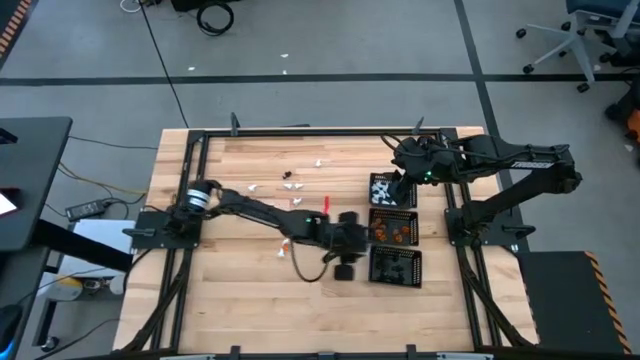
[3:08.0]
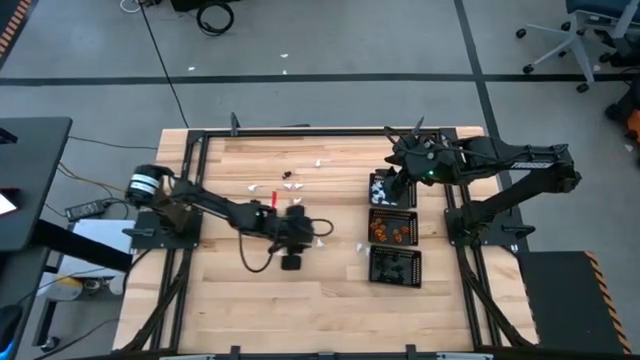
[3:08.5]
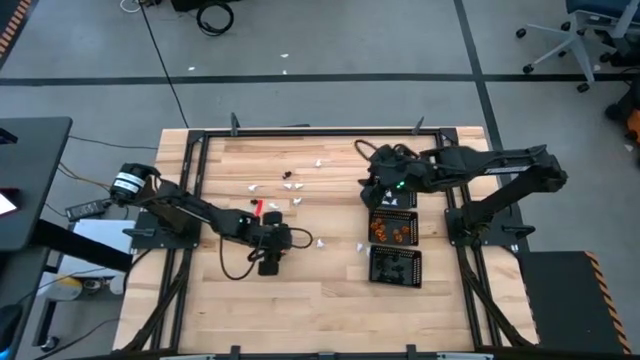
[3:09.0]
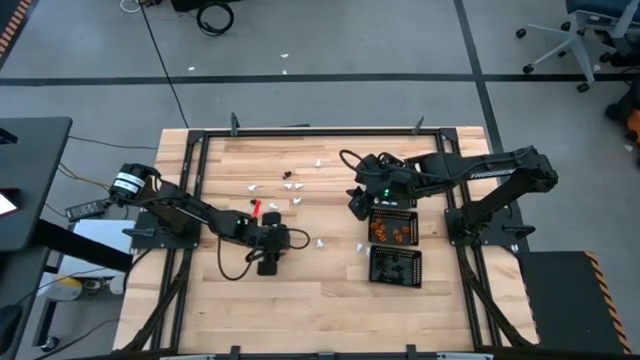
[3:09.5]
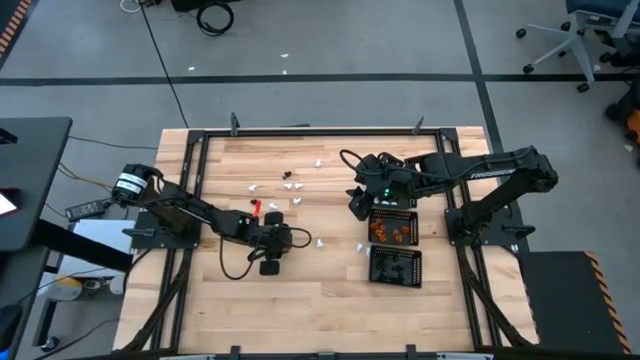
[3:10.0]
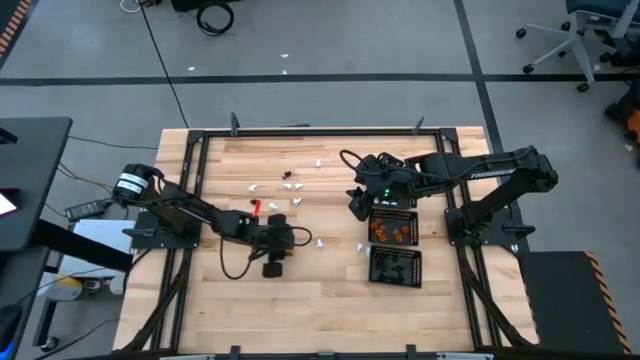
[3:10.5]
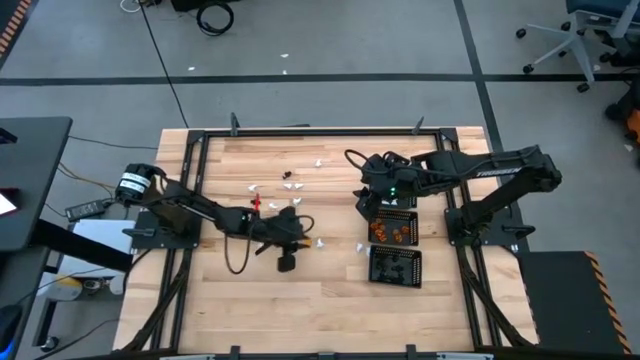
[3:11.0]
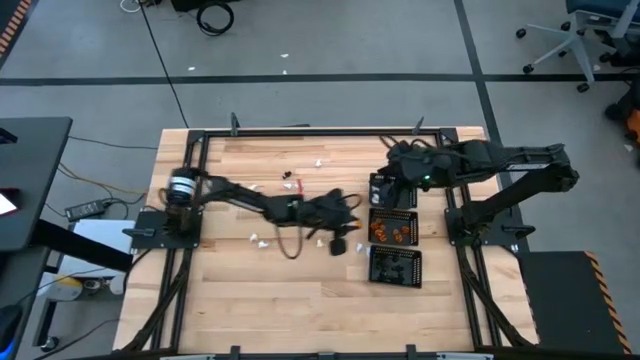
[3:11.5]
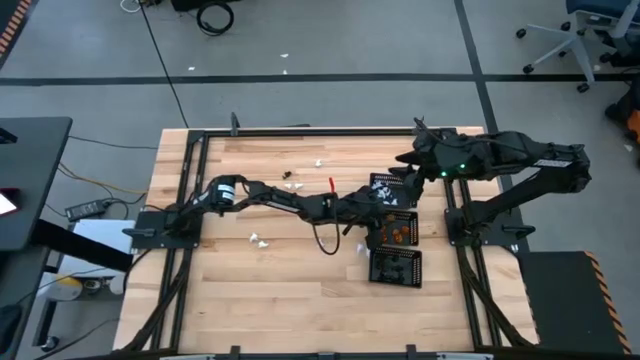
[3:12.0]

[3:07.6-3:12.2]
Task: Sort Halloween decoration
Put the orange pumpkin toy into the center black bin

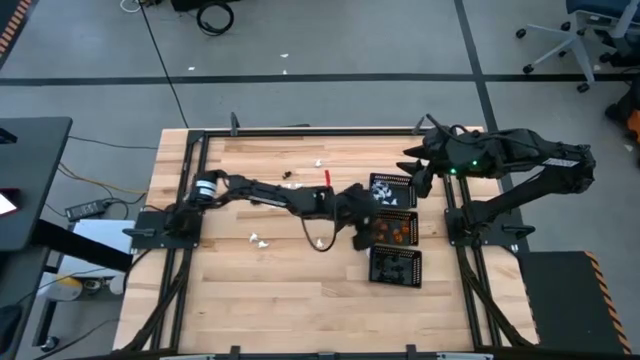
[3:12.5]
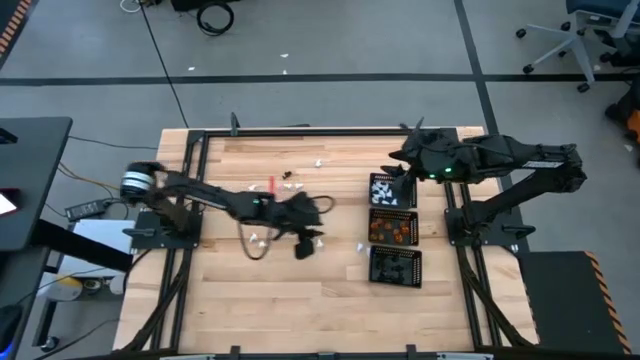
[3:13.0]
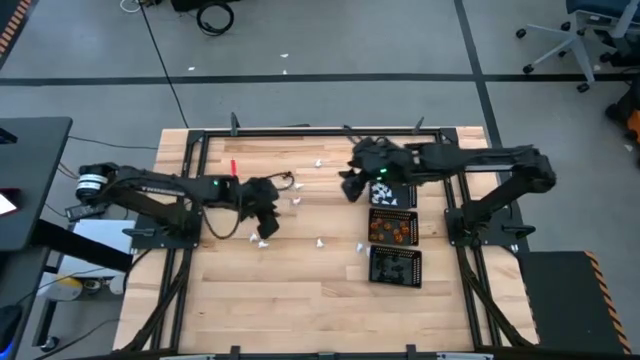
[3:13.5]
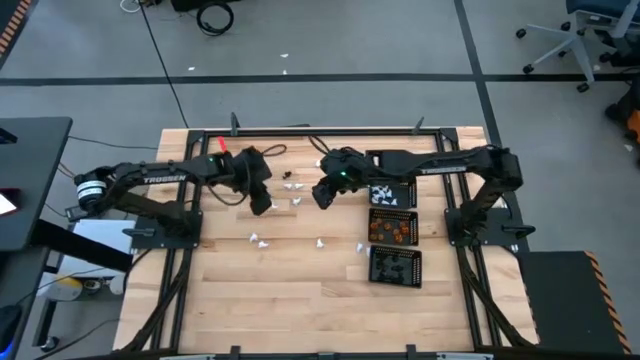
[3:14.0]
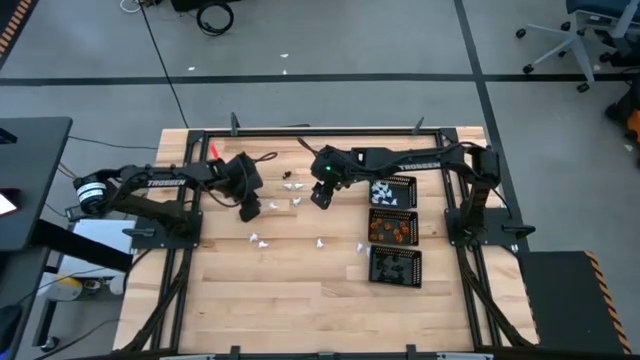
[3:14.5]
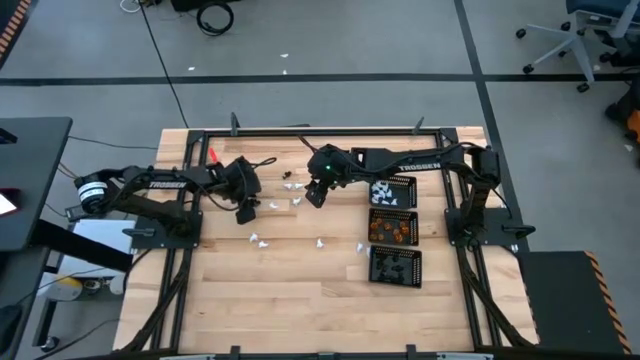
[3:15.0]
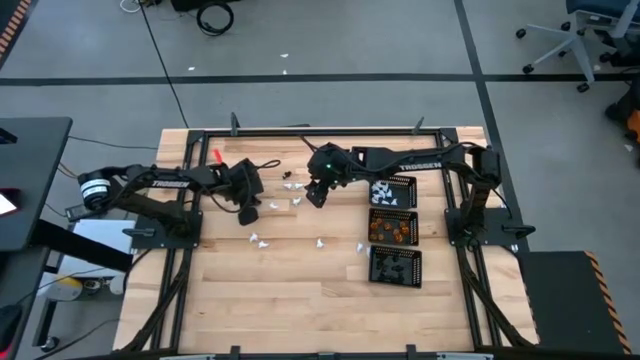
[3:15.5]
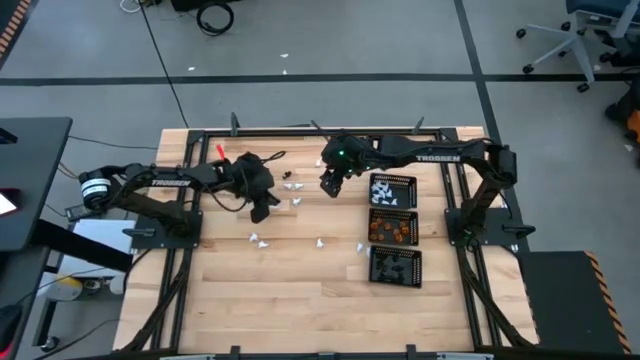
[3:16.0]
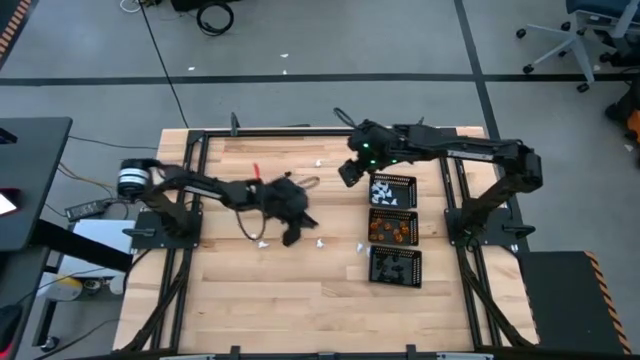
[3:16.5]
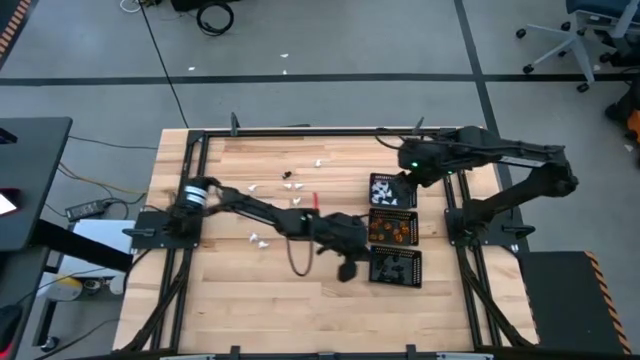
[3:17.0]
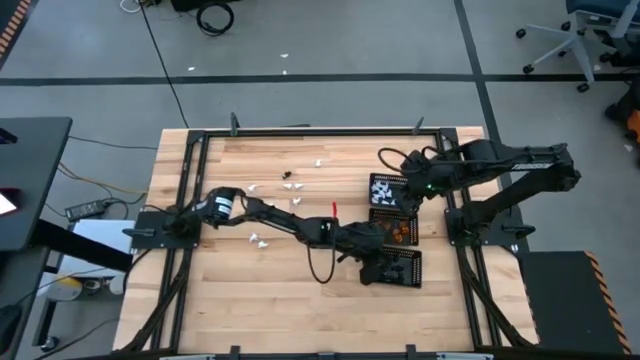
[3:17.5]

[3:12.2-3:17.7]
Put the black ghost toy into the bottom black bin

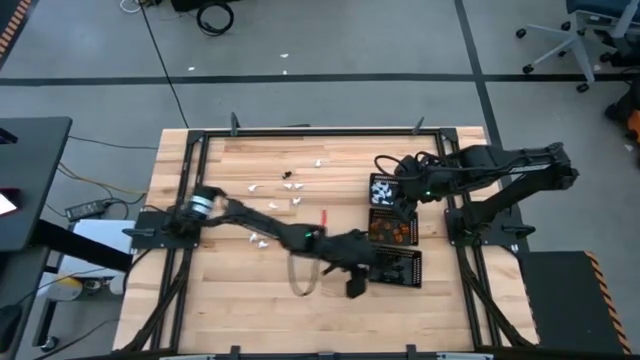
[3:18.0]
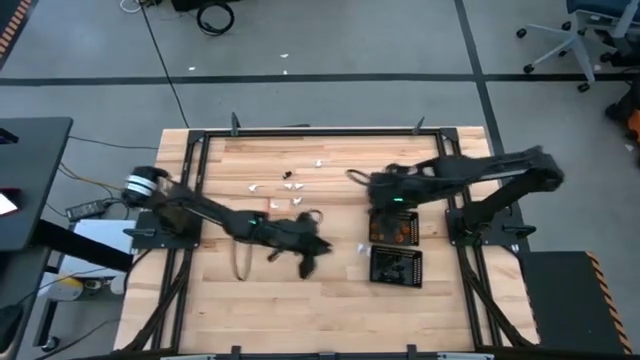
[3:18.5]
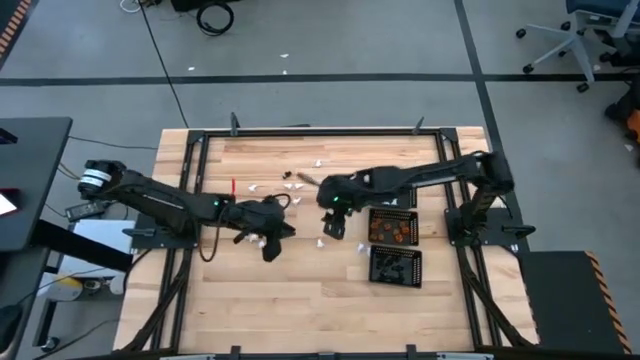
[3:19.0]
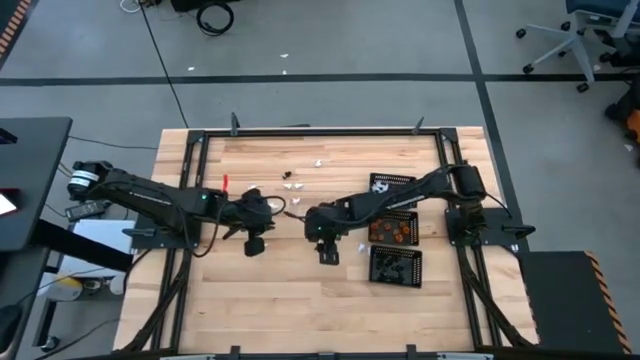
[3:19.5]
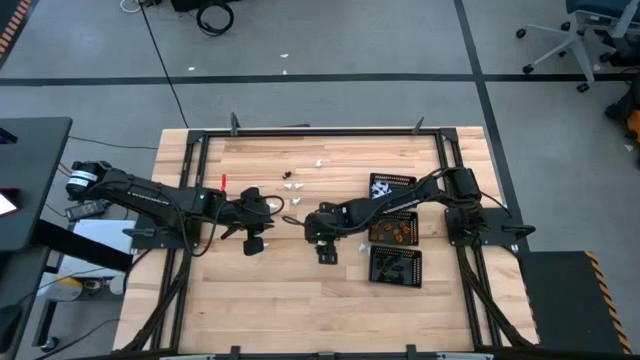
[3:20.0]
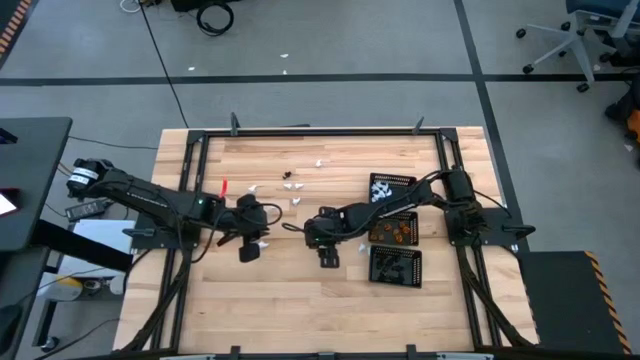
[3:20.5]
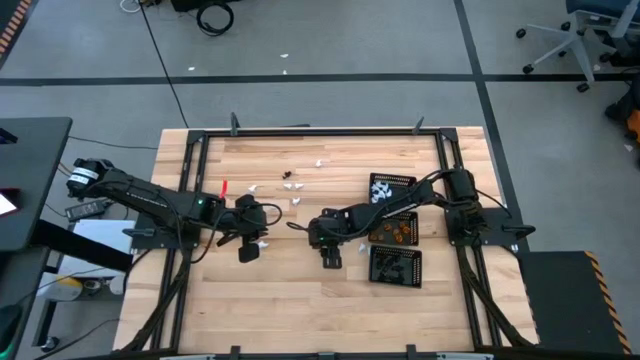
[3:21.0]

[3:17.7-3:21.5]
Put the white ghost toy into the top black bin

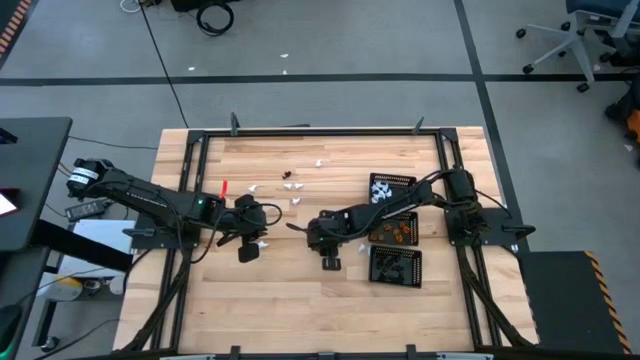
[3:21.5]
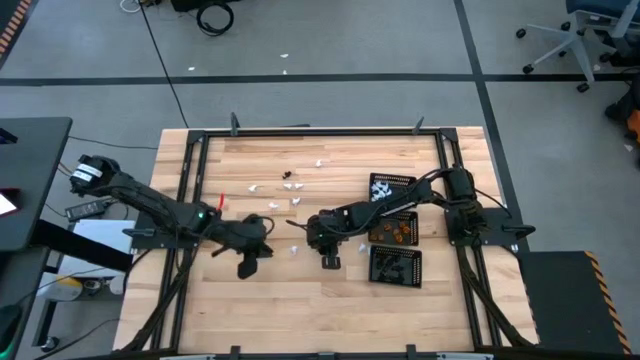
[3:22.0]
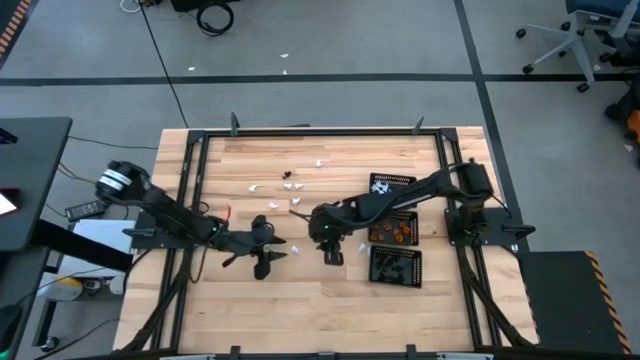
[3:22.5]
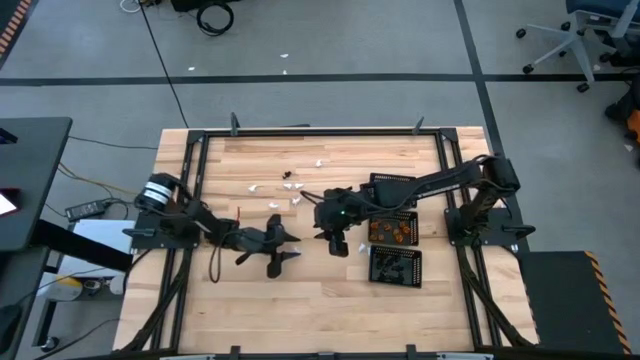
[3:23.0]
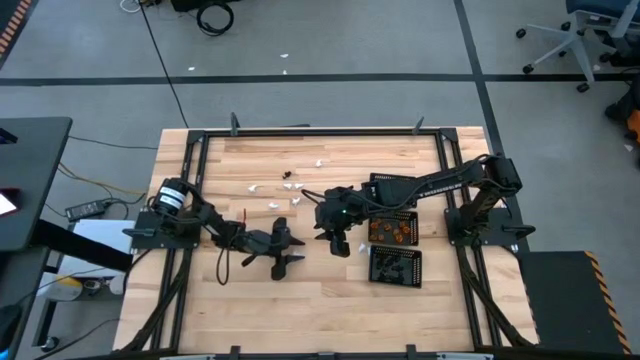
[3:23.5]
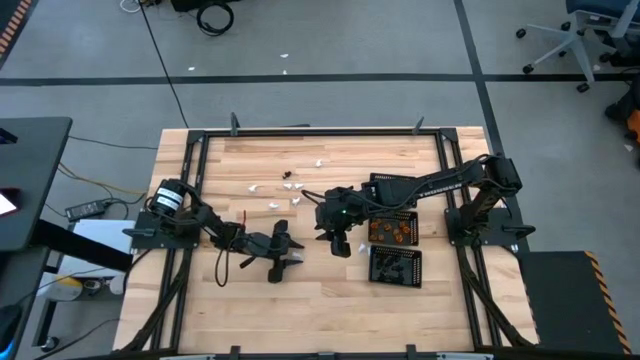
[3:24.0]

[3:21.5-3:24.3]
Put the white ghost toy into the top black bin

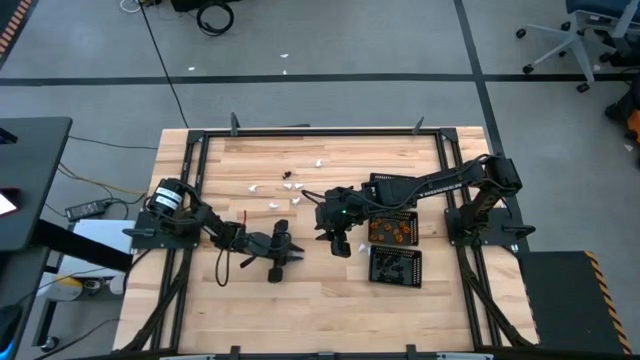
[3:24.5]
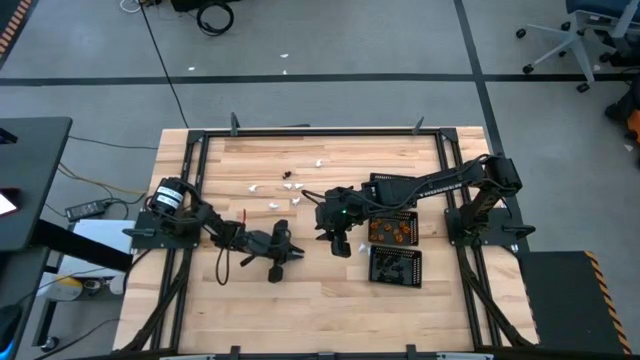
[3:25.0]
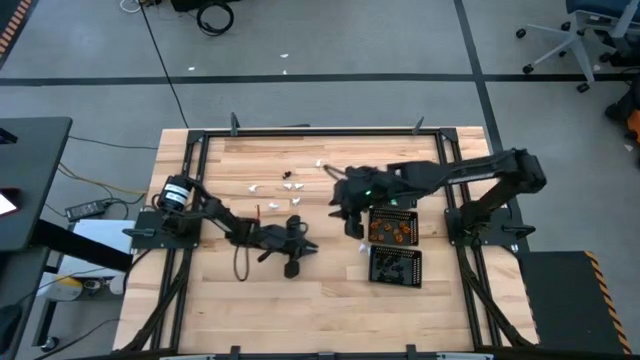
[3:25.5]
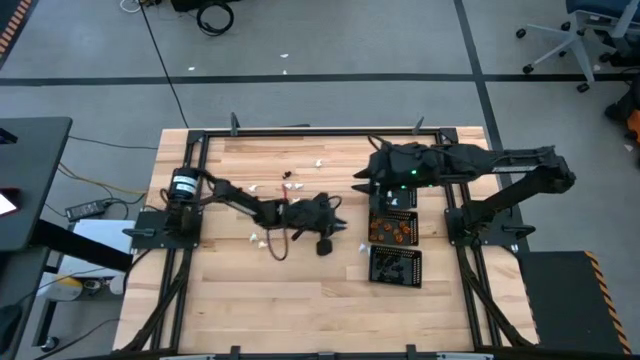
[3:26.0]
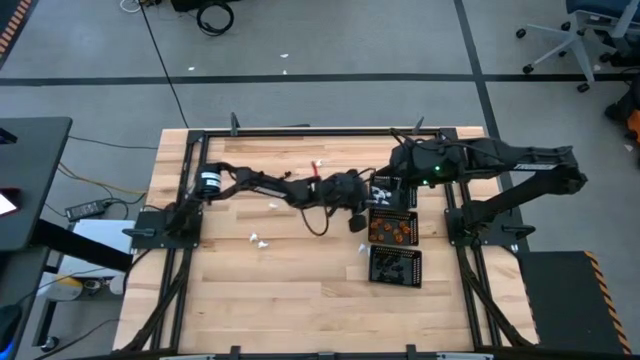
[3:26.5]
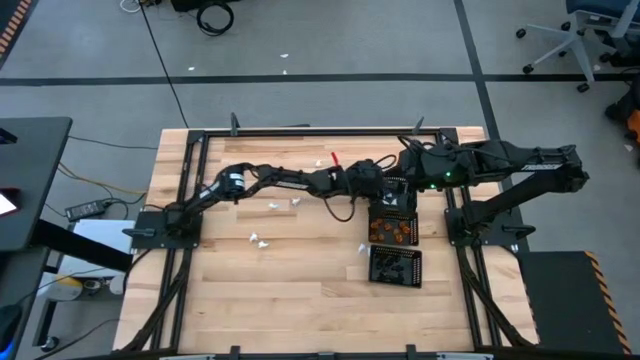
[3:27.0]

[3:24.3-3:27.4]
Put the white ghost toy into the top black bin
